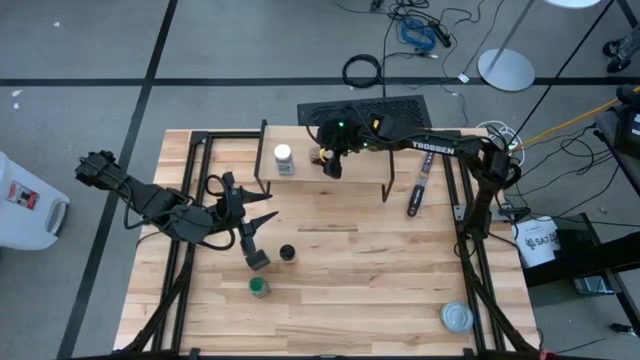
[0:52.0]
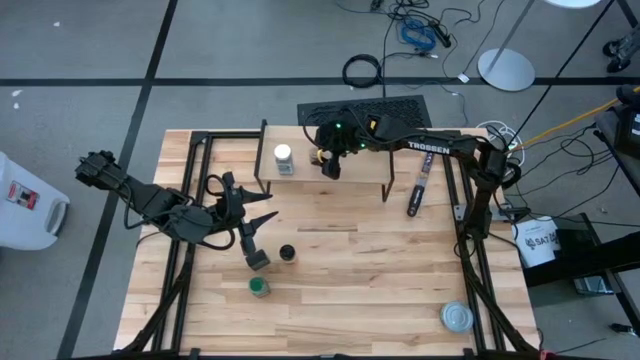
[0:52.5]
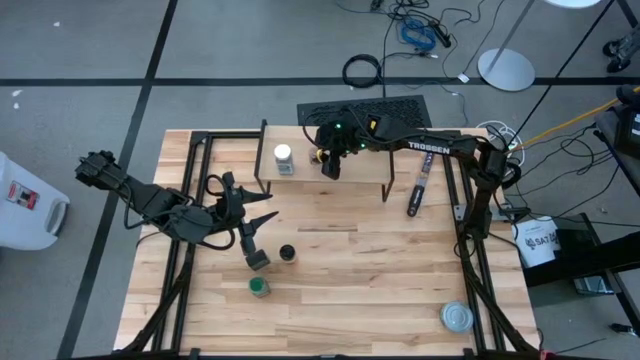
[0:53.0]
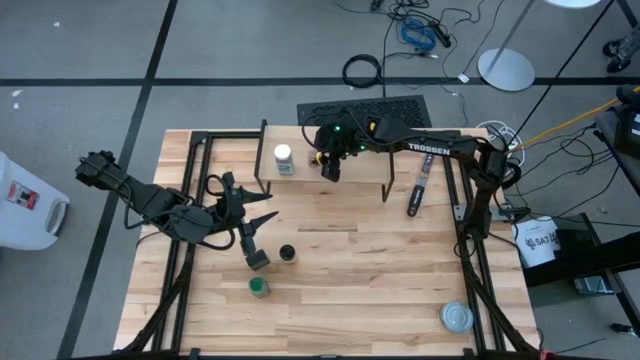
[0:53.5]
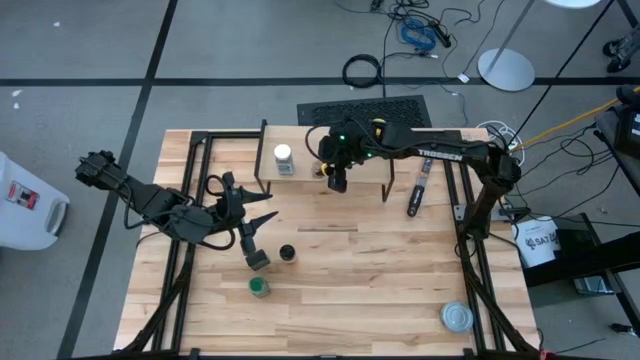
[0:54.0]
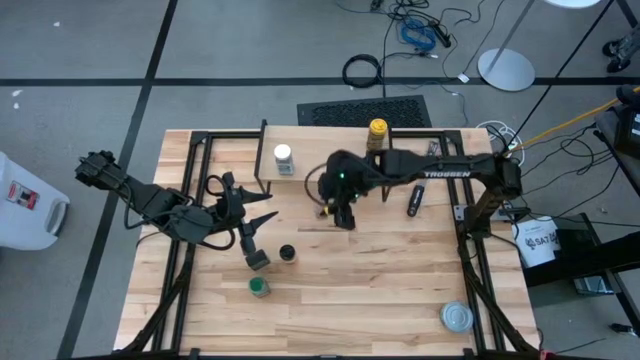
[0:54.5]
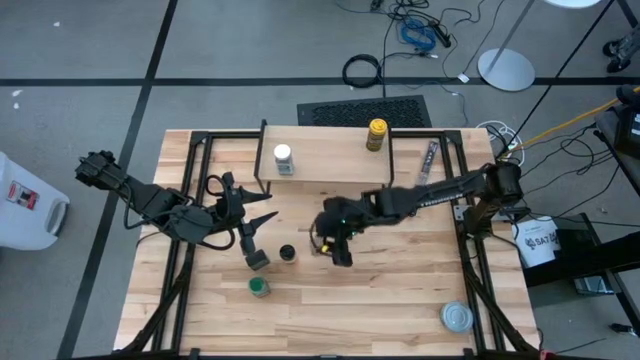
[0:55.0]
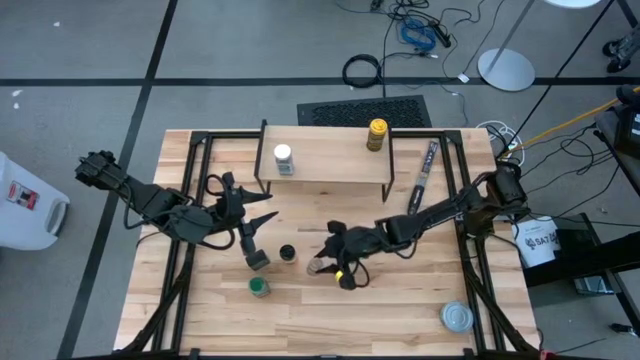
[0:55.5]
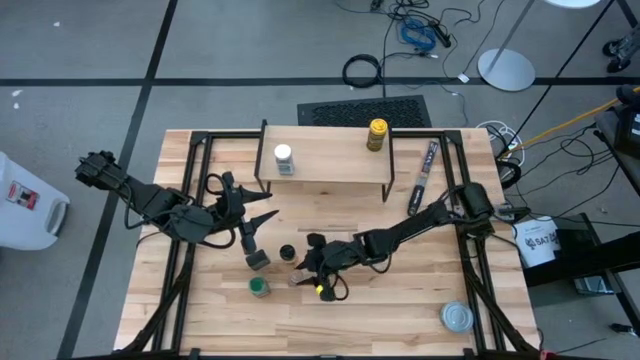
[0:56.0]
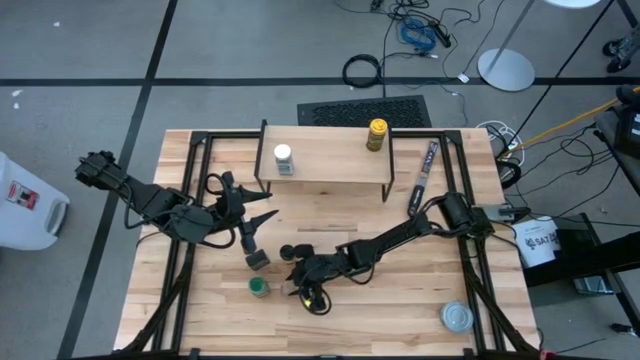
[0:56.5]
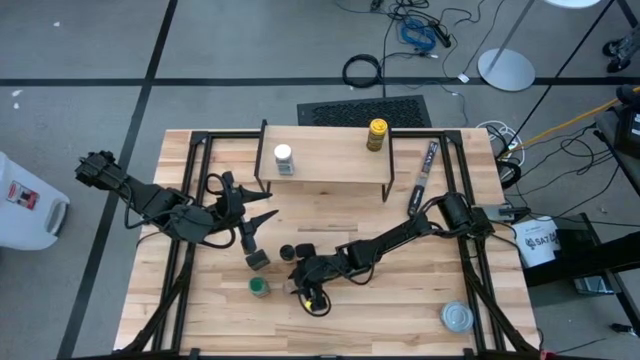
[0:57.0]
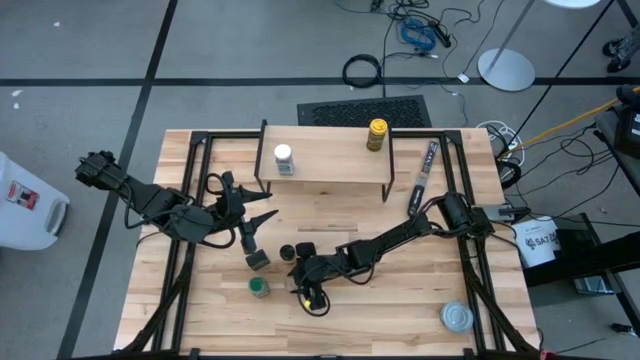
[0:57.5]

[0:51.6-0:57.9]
Task: Shelf spices
Remove the light brown seasoning bottle from the shelf

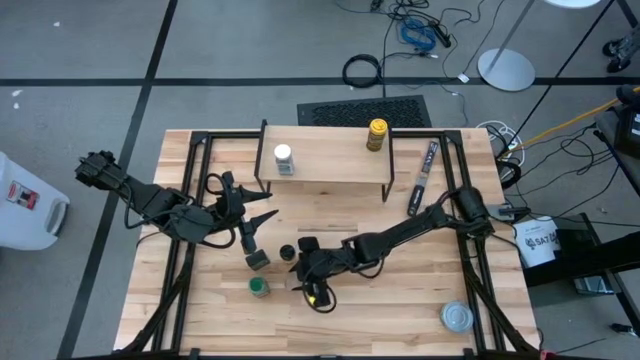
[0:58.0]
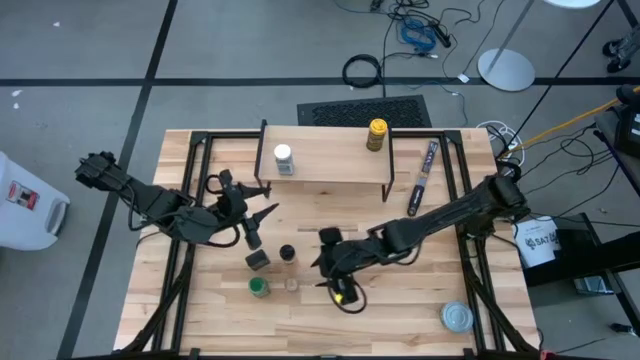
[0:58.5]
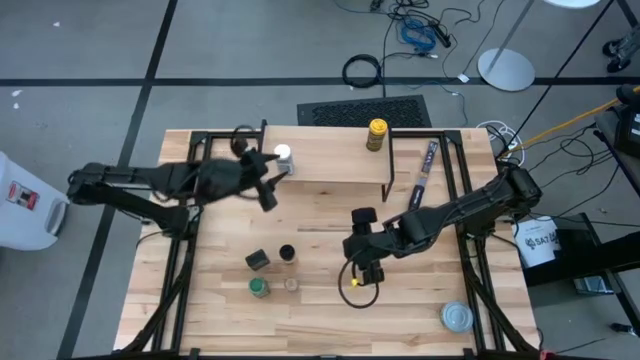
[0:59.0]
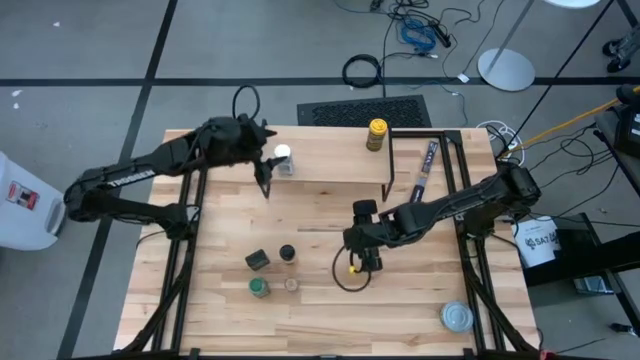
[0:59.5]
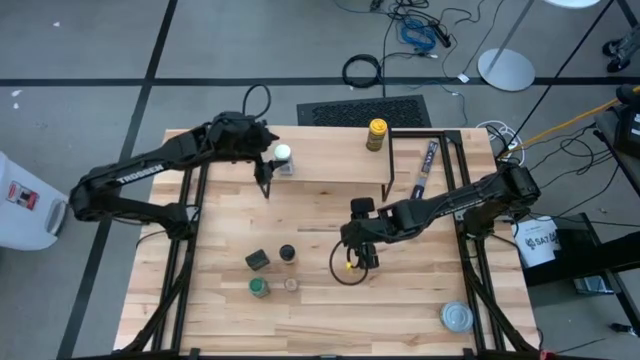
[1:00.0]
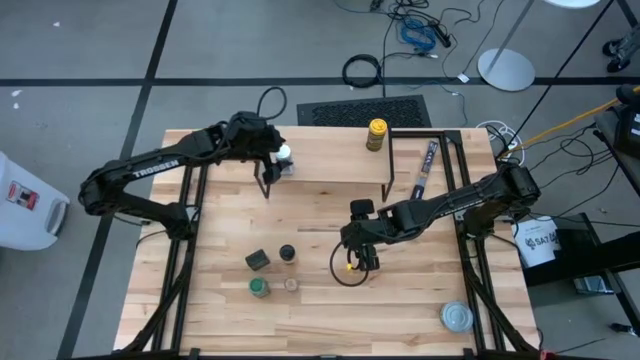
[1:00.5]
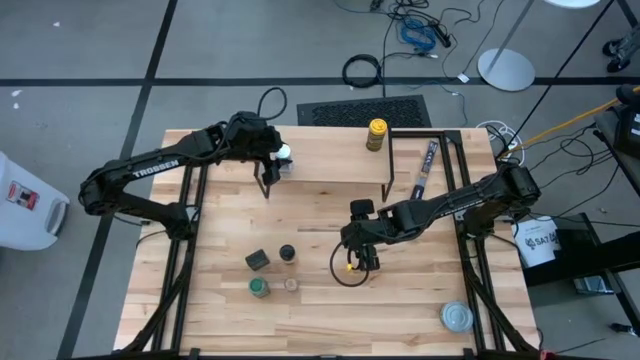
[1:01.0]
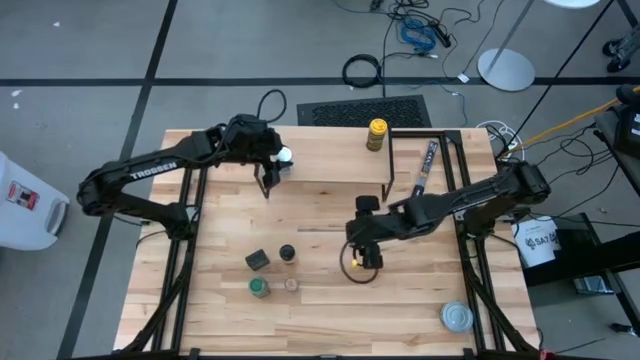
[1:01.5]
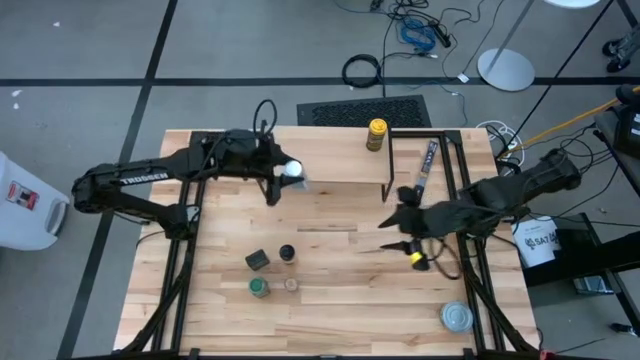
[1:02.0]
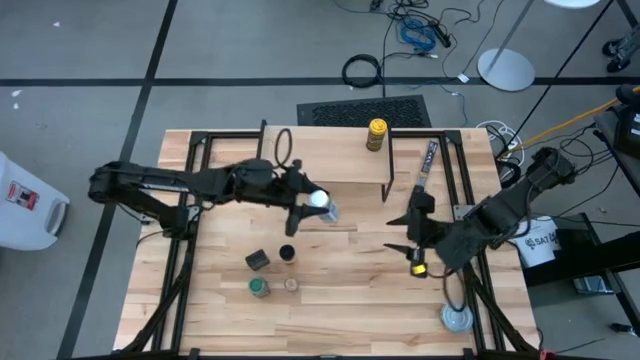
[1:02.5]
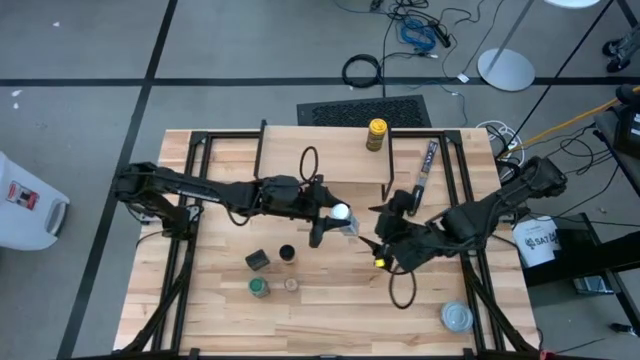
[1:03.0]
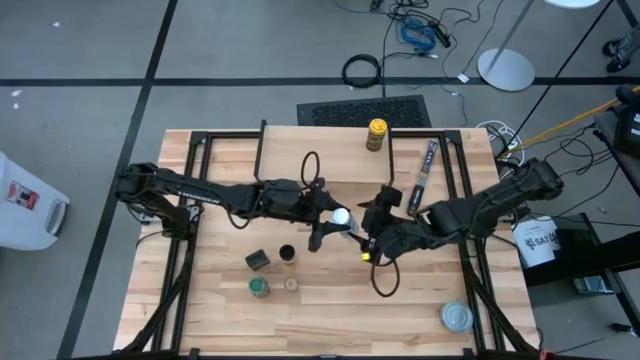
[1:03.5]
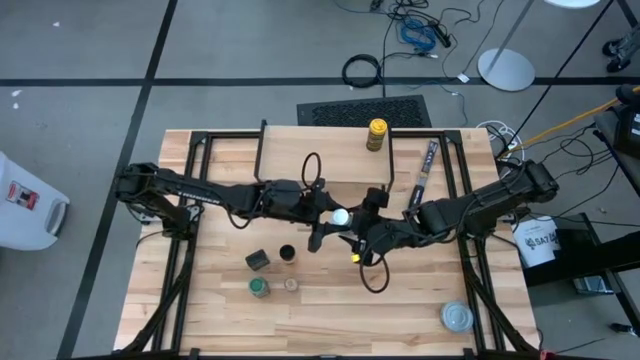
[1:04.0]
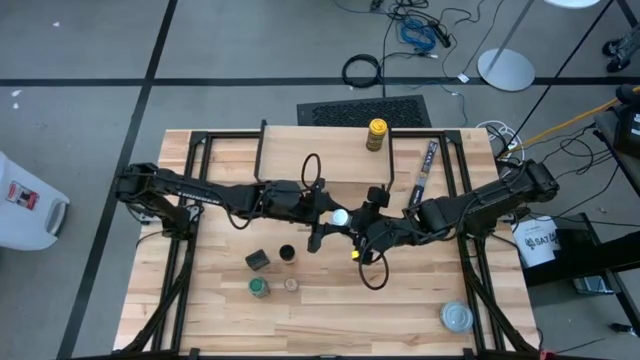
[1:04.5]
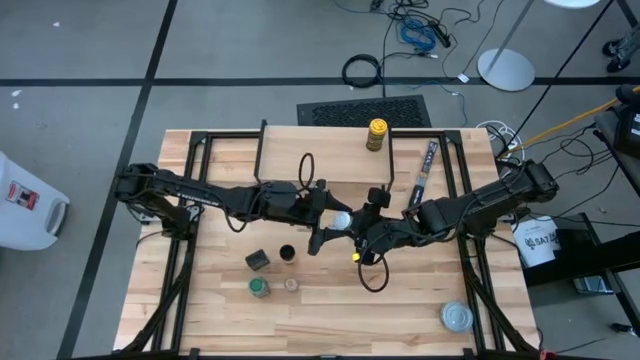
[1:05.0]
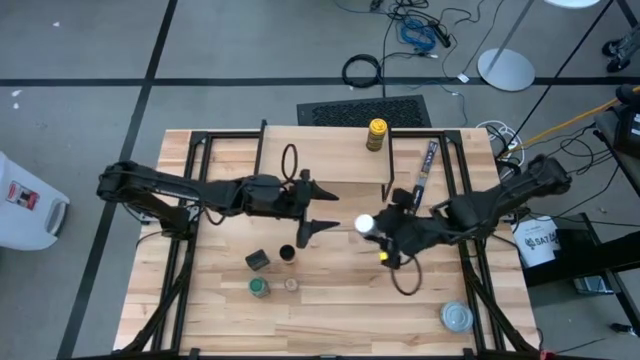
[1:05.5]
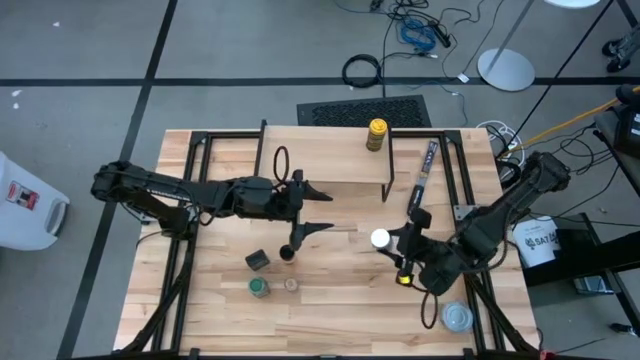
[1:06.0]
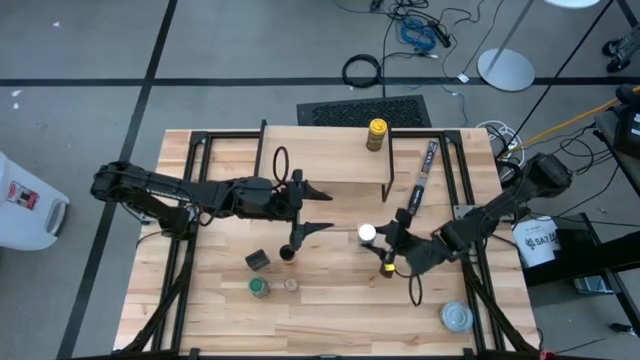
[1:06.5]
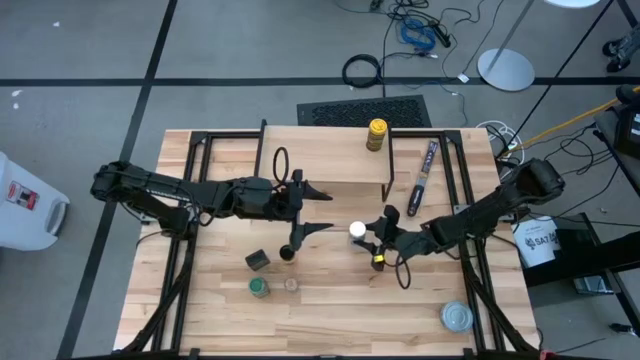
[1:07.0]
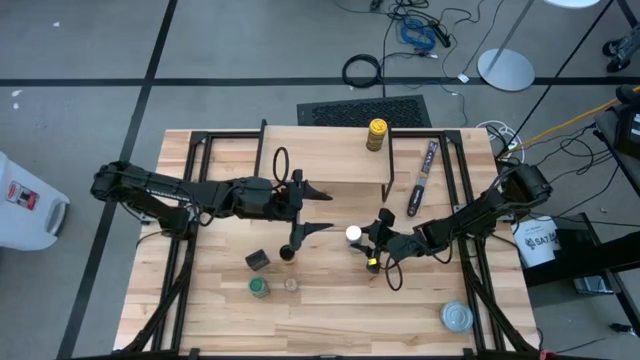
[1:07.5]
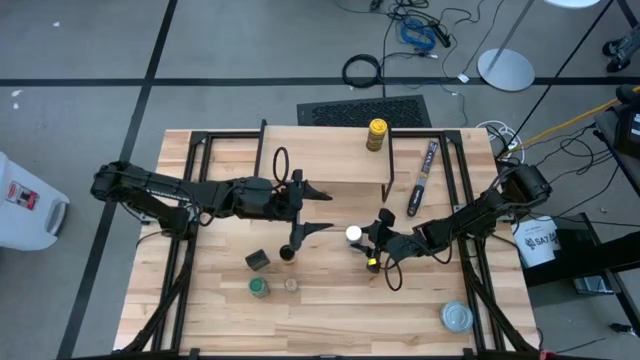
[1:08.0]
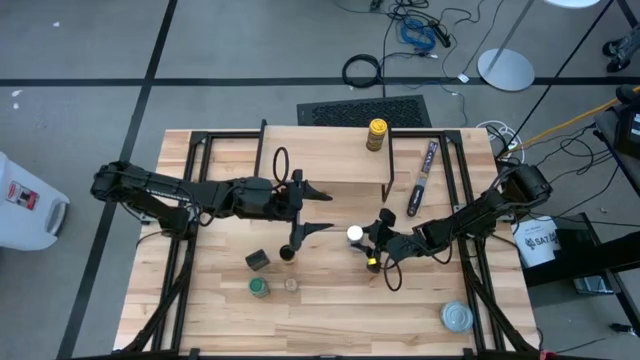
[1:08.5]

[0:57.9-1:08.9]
Remove the white seasoning bottle from the shelf

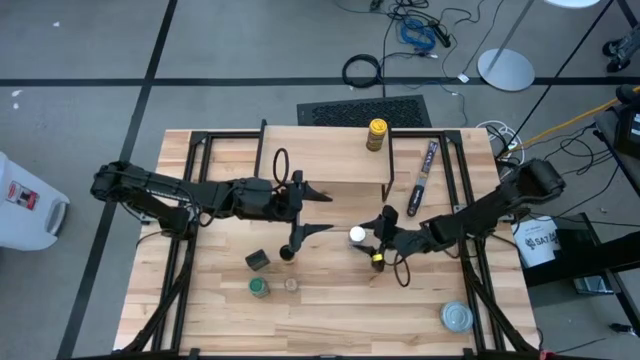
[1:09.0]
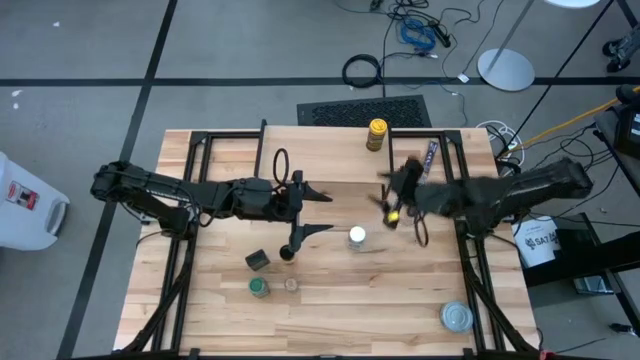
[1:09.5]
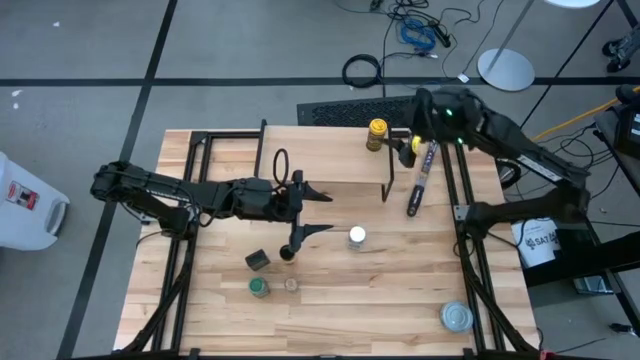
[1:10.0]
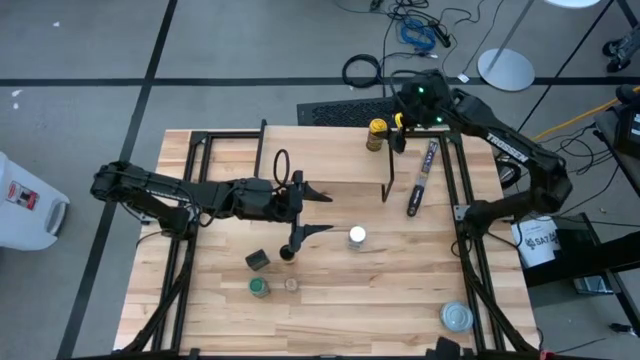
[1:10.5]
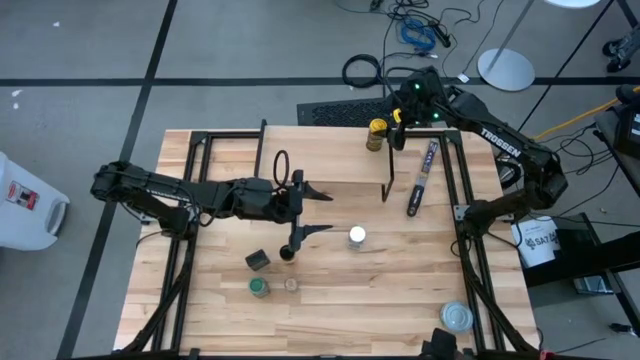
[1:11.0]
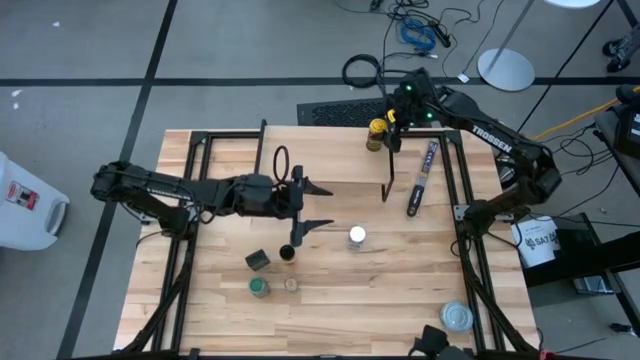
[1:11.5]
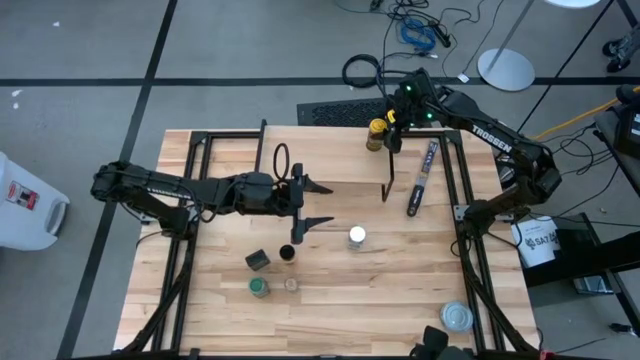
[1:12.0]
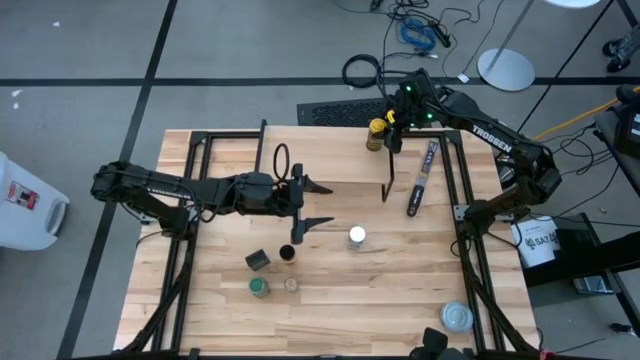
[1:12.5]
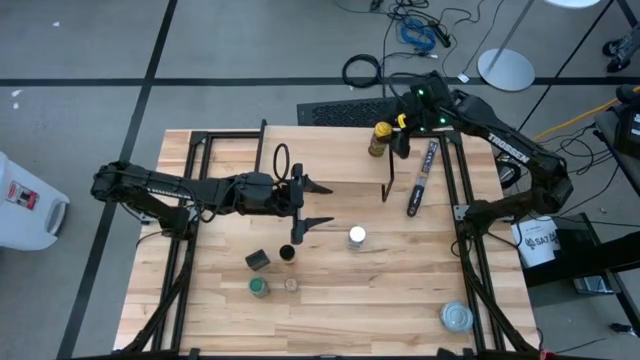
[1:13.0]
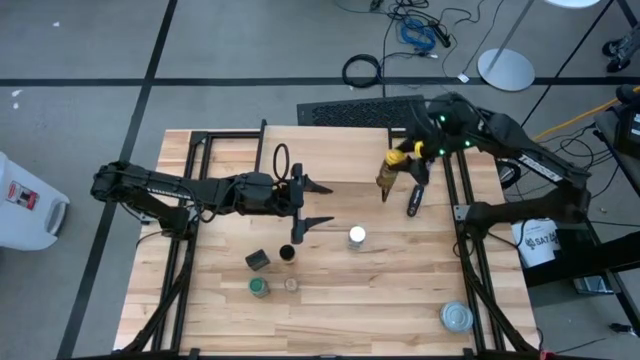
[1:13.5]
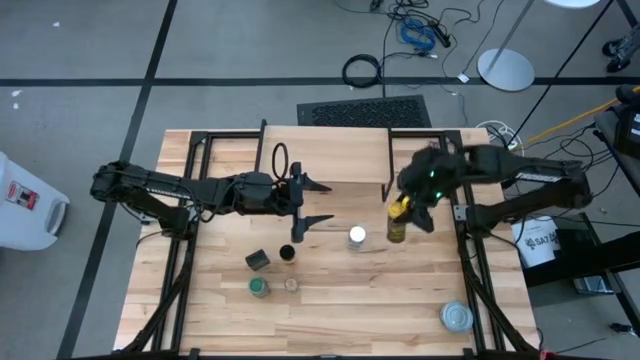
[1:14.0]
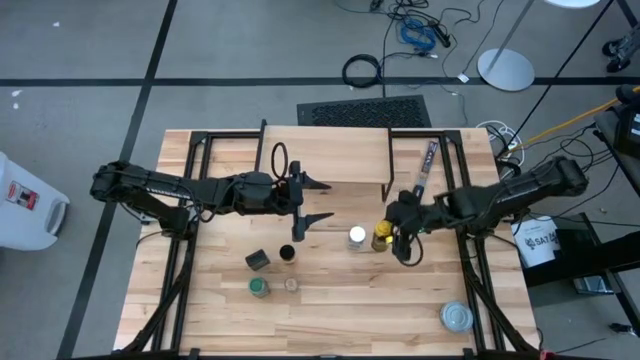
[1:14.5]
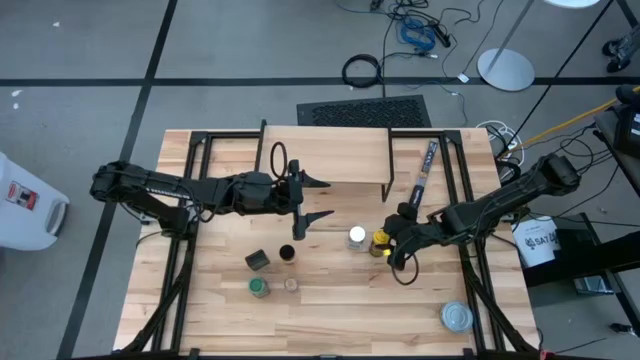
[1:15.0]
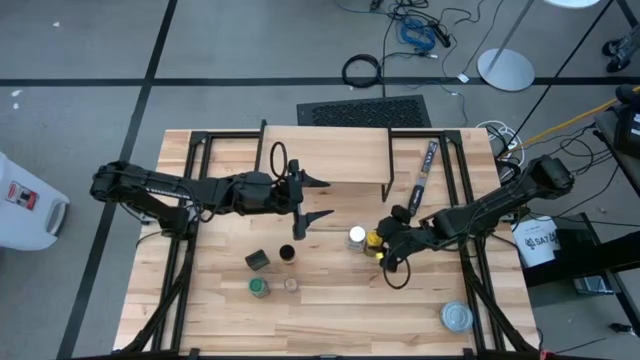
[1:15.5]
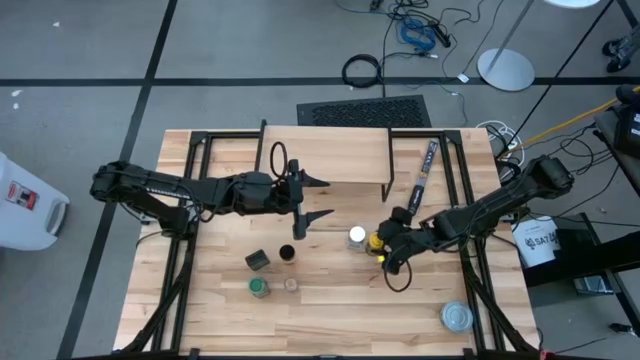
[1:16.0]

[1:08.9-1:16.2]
Remove the yellow seasoning bottle from the shelf
